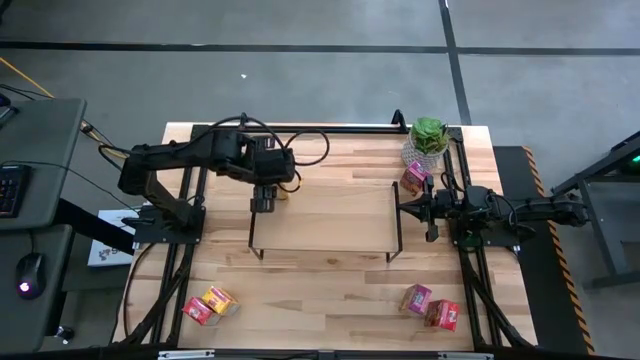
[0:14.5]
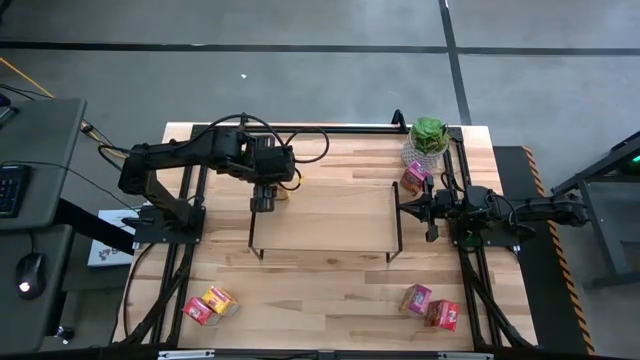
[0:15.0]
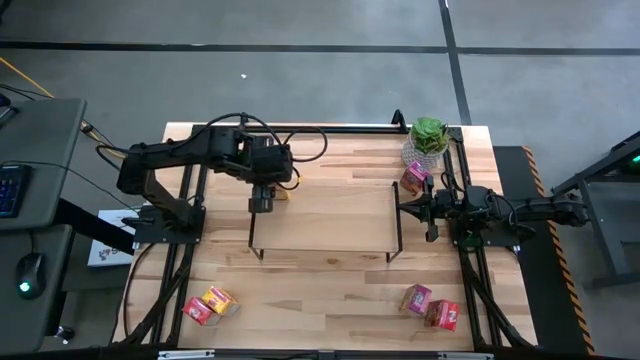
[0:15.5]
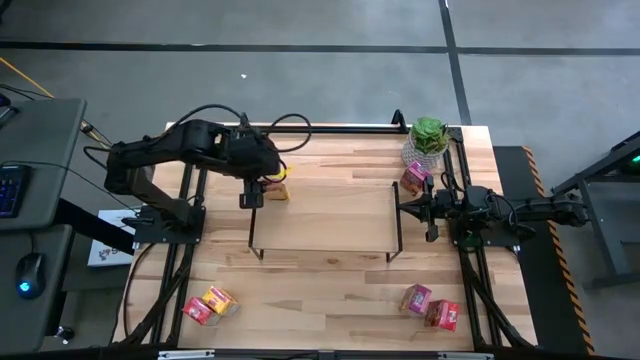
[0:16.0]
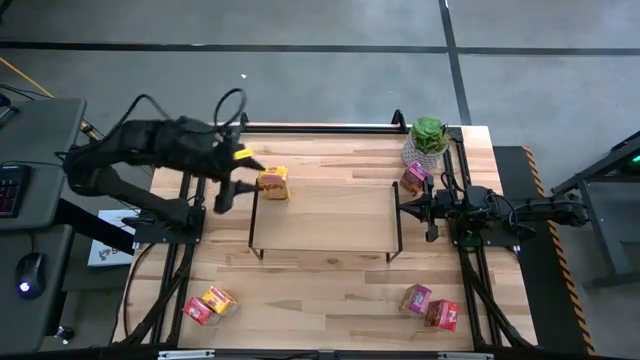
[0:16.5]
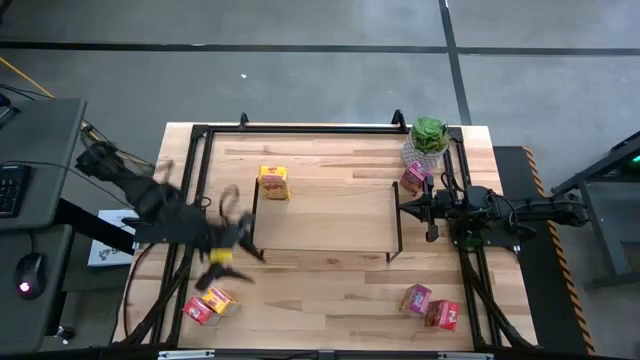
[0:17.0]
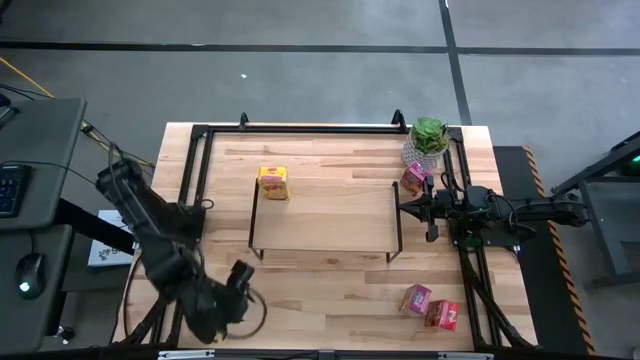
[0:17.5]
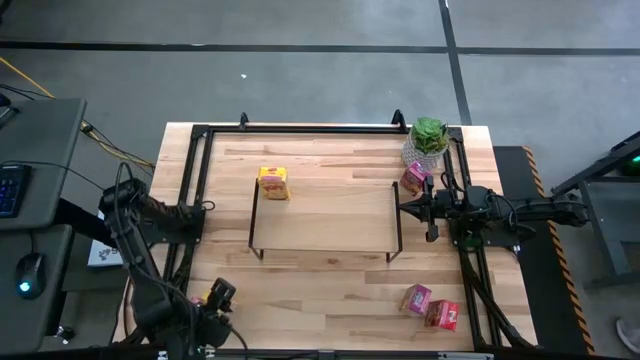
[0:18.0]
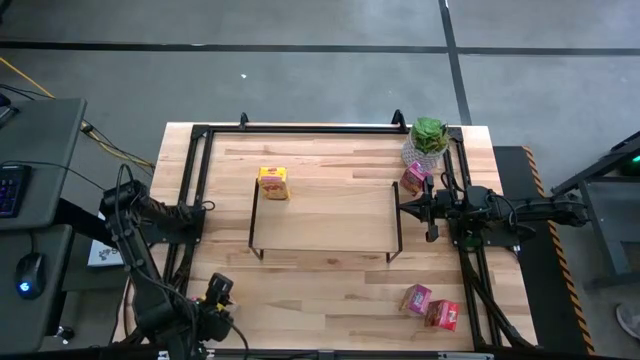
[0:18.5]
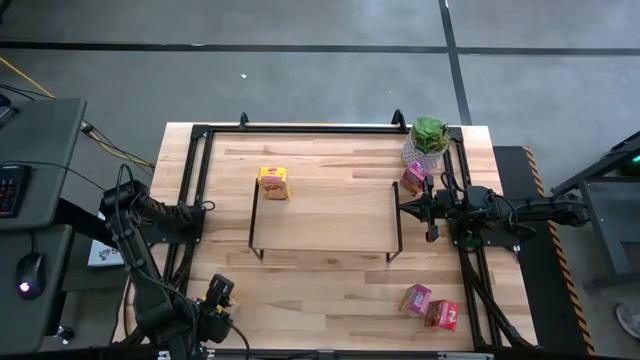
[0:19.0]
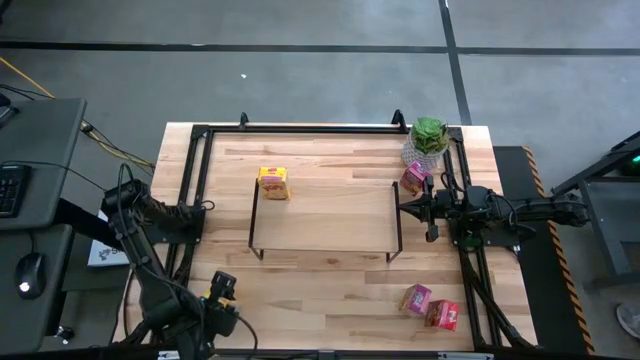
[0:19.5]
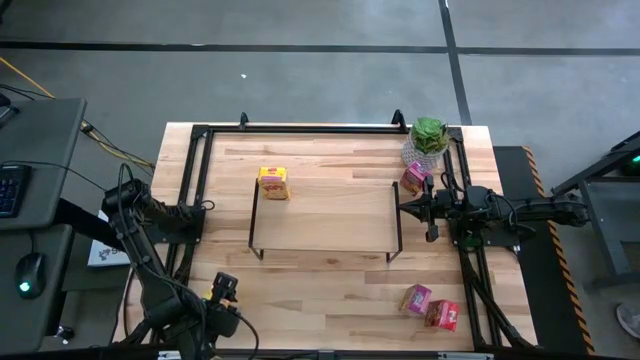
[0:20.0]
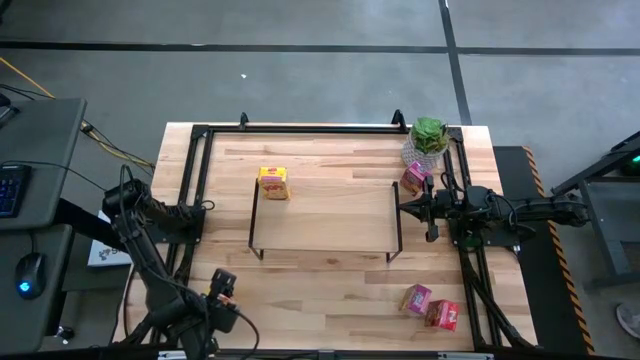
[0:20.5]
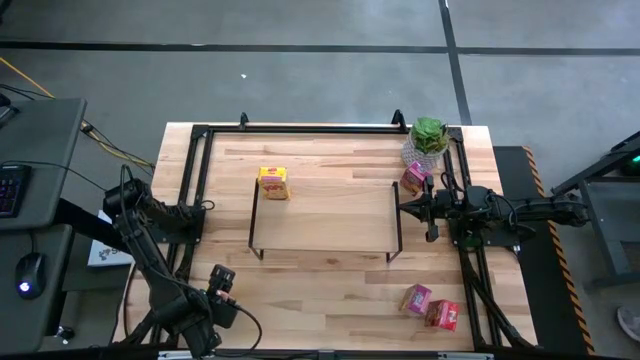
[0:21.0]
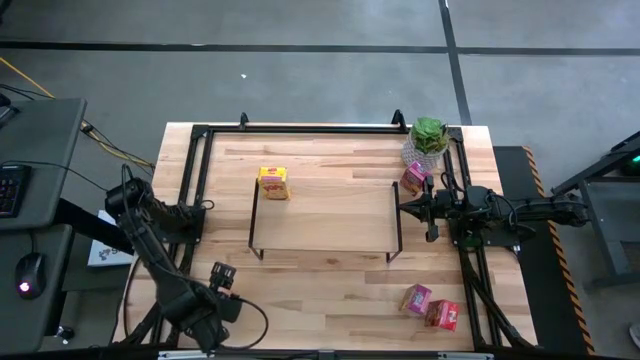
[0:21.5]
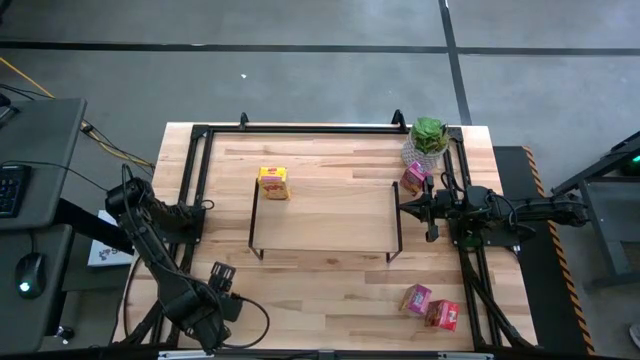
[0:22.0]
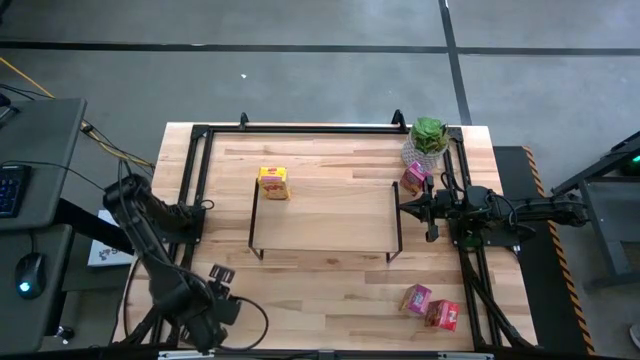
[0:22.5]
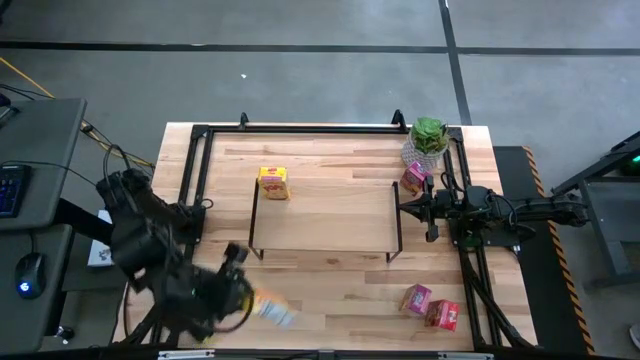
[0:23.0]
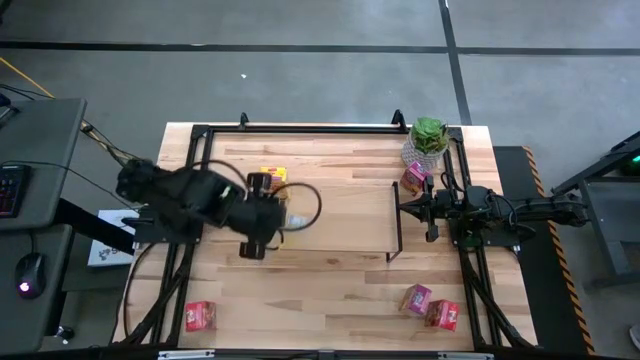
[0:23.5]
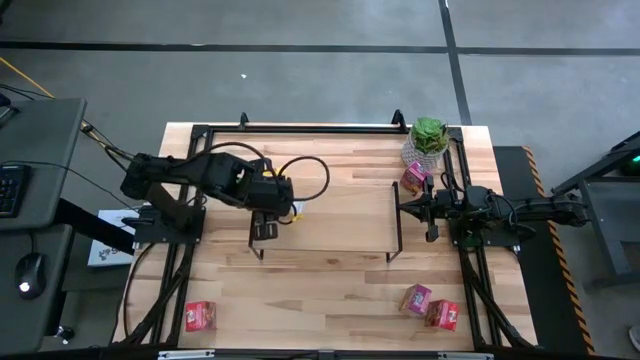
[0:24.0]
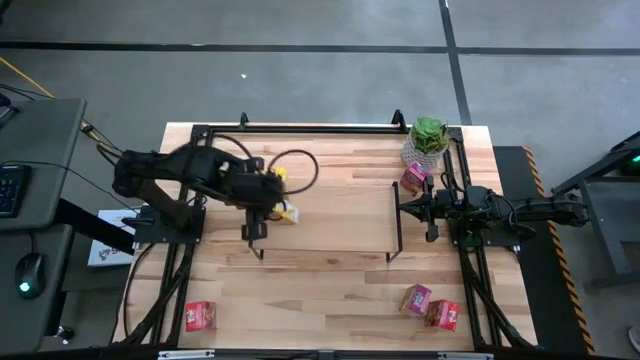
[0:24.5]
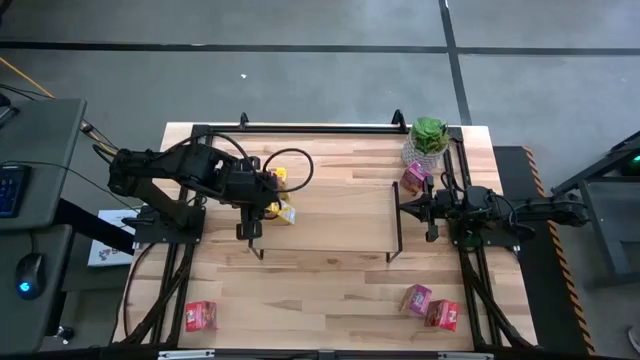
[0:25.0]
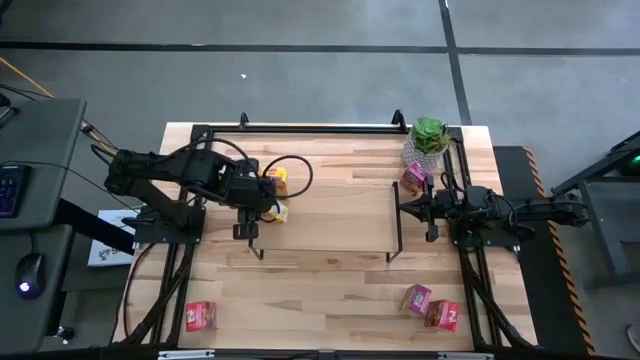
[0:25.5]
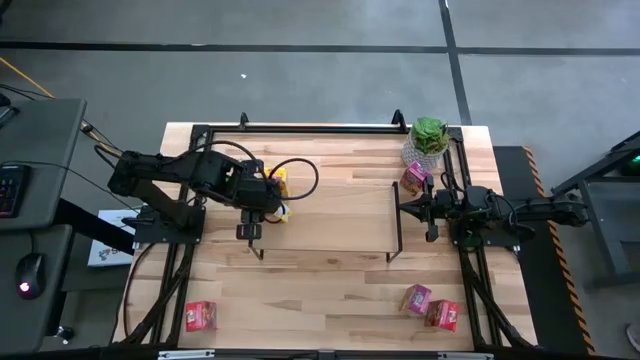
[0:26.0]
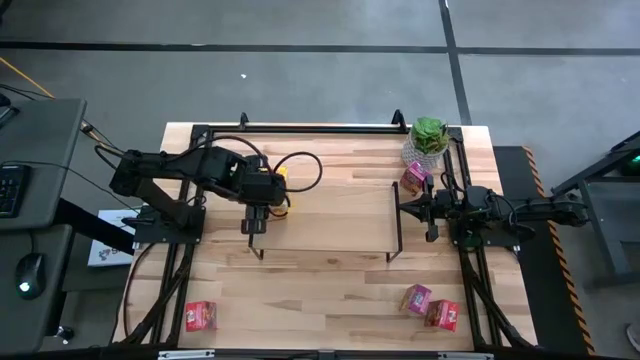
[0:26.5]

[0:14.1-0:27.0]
Task: Stack cereal on shelf
Put the yellow cereal box on the shelf

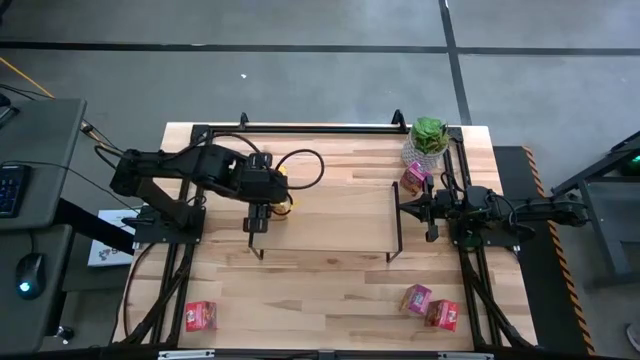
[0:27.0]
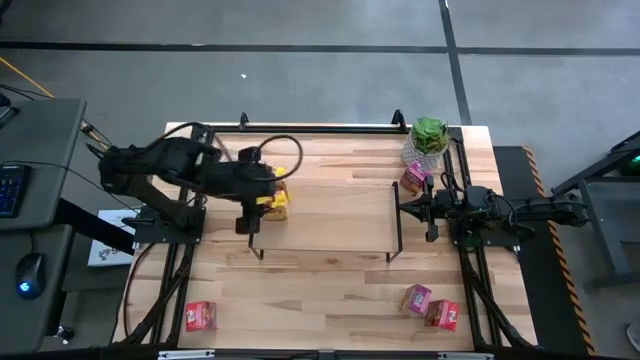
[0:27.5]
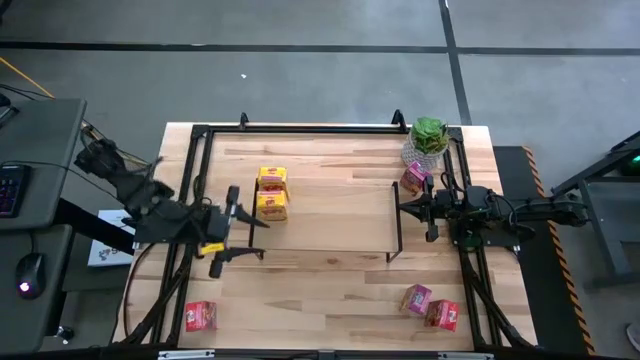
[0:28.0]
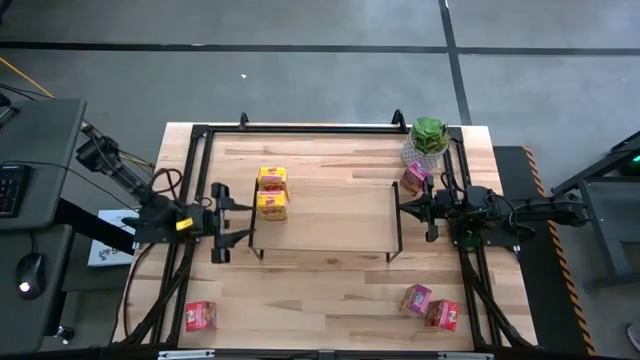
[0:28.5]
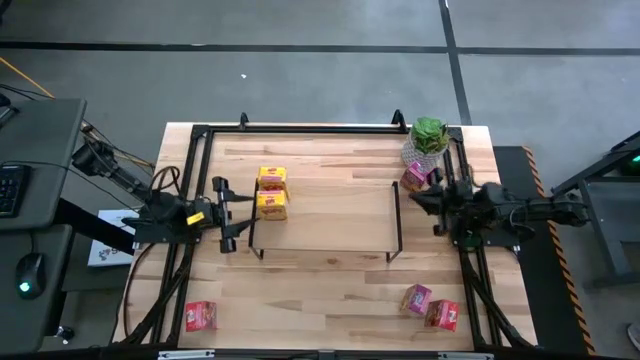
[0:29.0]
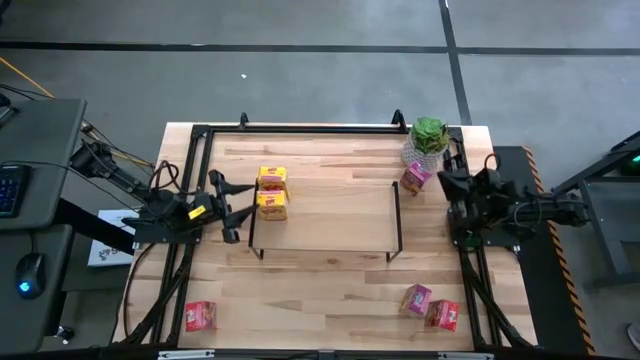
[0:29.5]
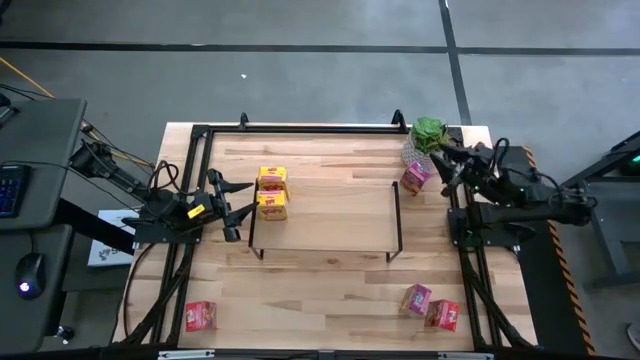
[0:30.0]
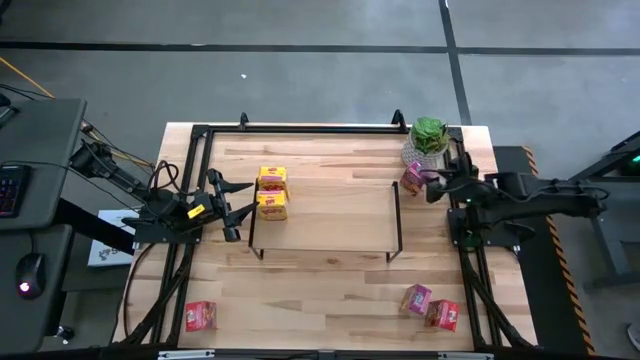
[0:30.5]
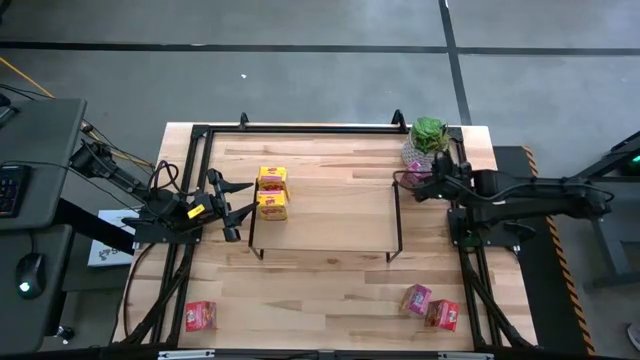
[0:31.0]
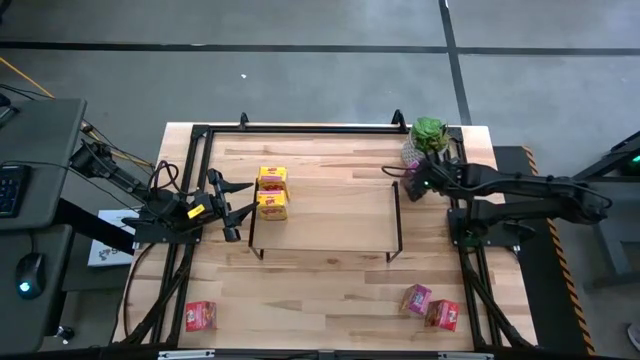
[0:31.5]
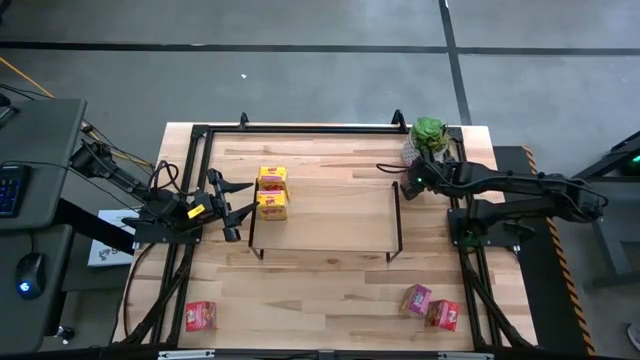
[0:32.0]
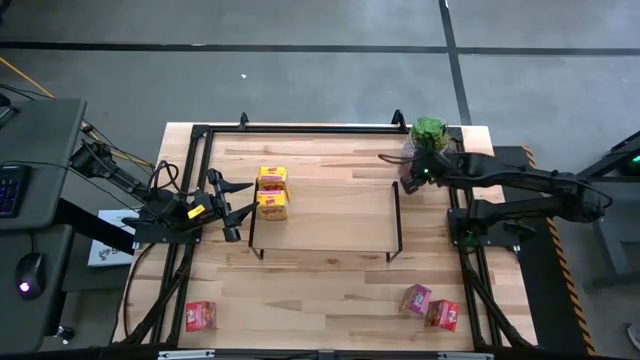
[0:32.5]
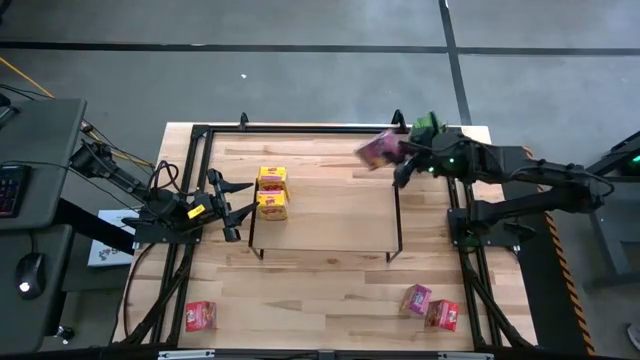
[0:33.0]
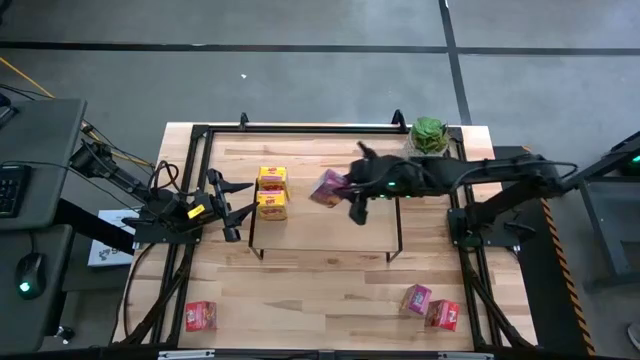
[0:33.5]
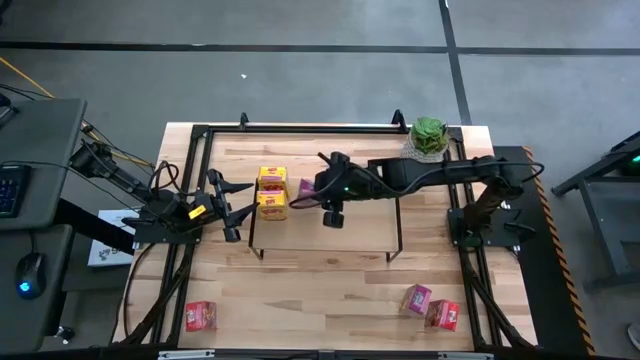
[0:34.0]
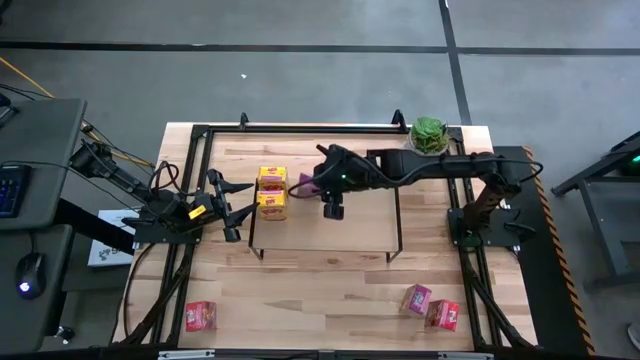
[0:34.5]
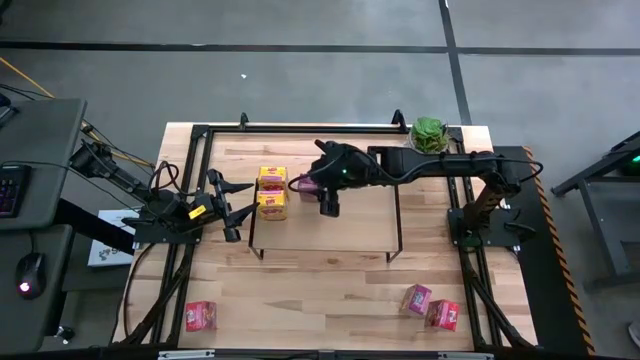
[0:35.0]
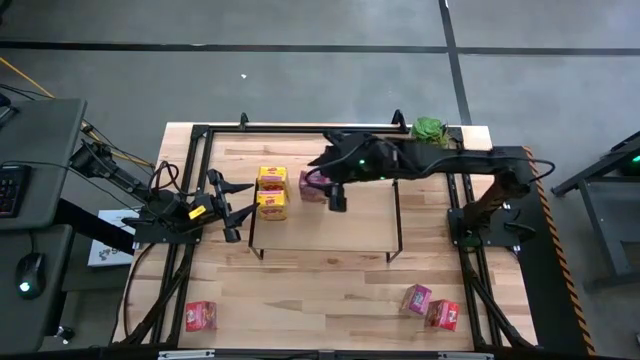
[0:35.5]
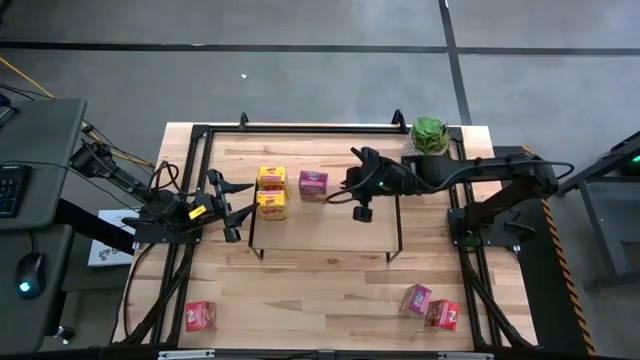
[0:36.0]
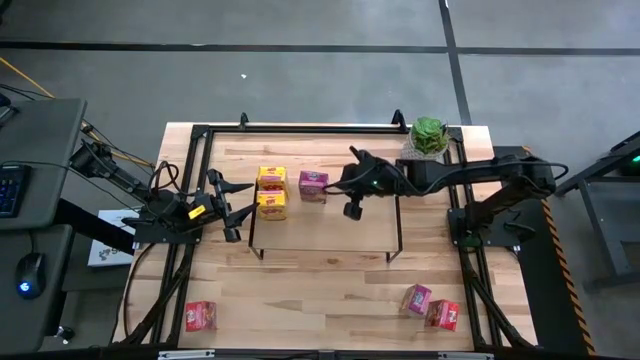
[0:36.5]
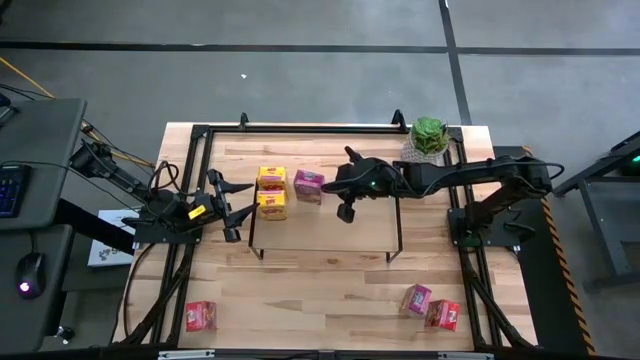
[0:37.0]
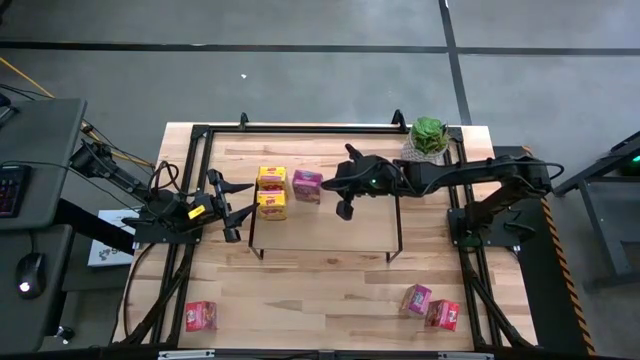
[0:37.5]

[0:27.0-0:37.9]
Put the top purple cereal box on the shelf
